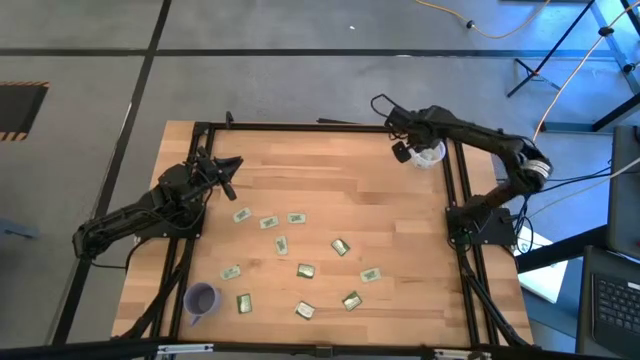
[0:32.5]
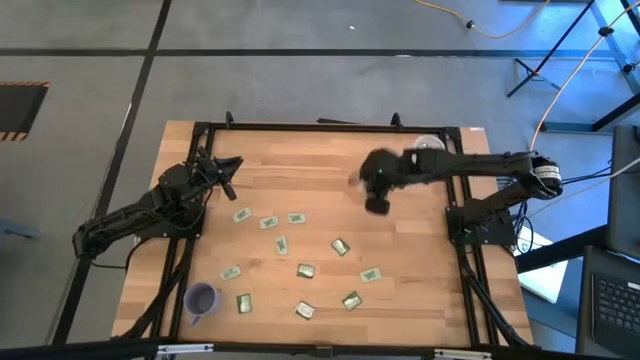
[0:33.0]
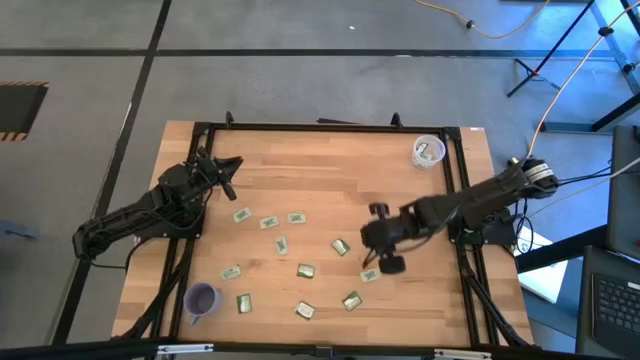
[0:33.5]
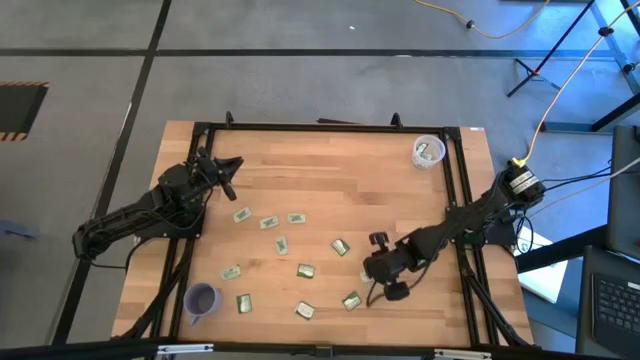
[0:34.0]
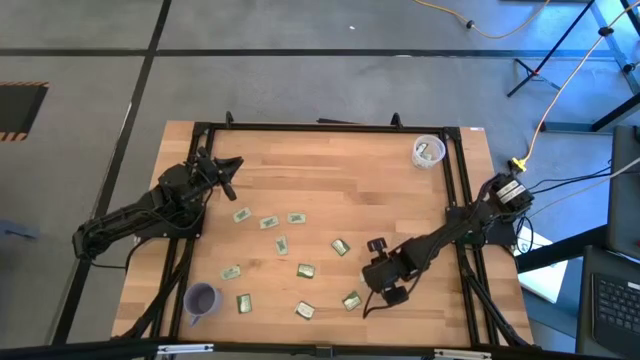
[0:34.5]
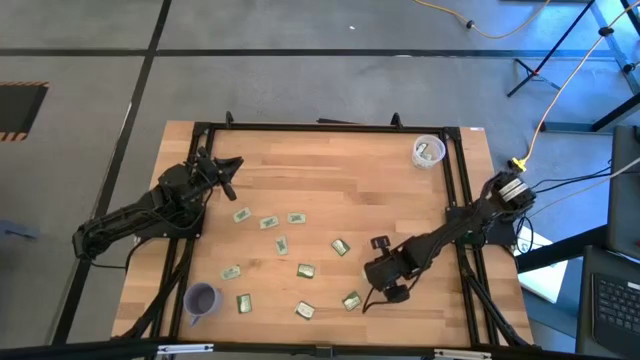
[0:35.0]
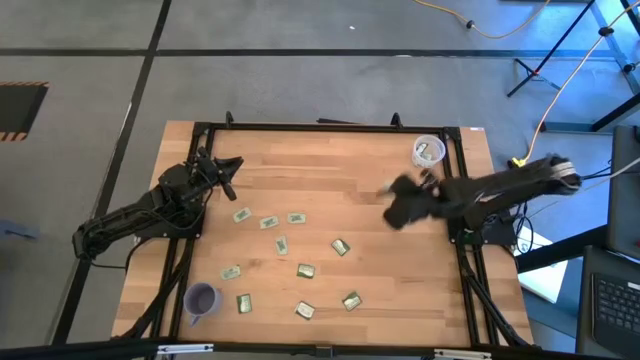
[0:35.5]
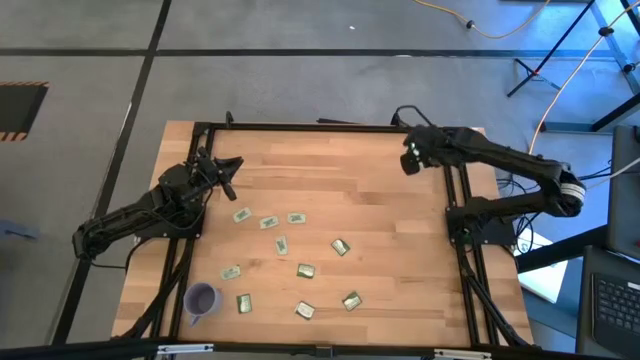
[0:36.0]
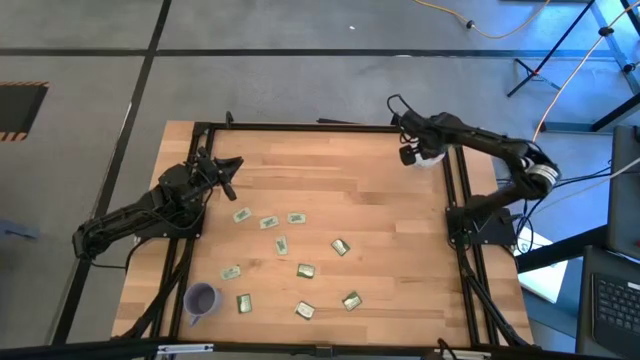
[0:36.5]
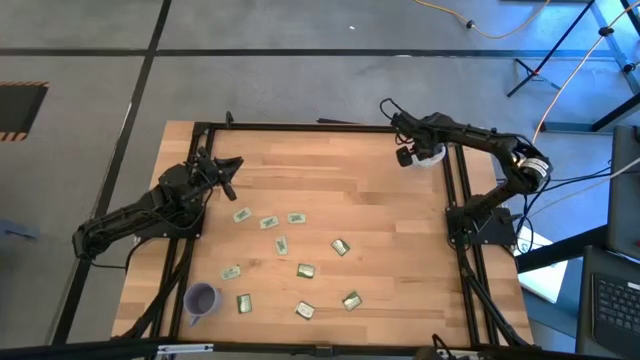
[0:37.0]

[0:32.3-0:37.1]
Task: Pick and place Stevia / Truvia into bins
Put the light green stevia packet into the transparent container

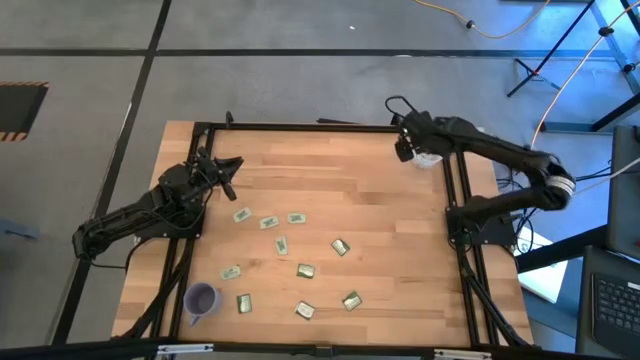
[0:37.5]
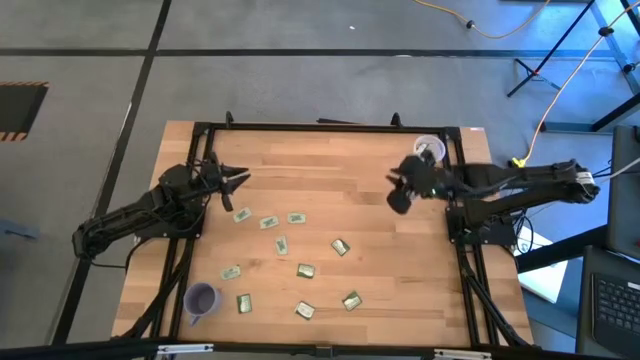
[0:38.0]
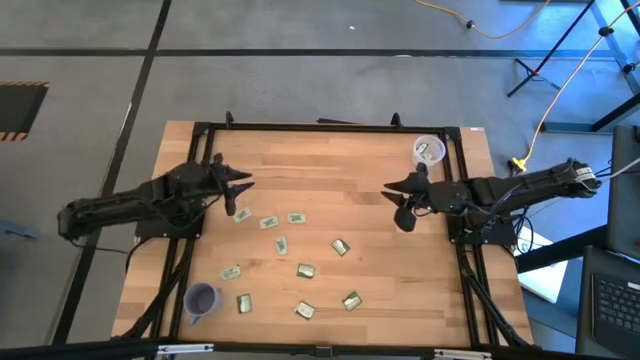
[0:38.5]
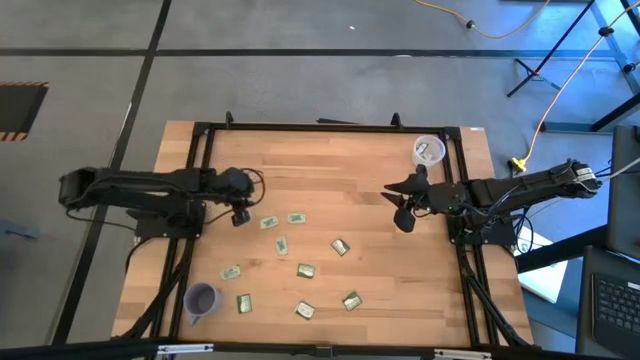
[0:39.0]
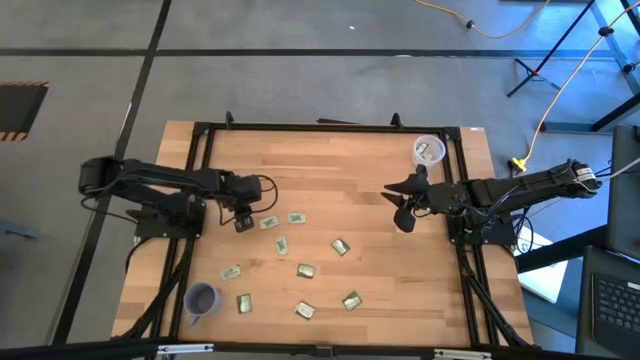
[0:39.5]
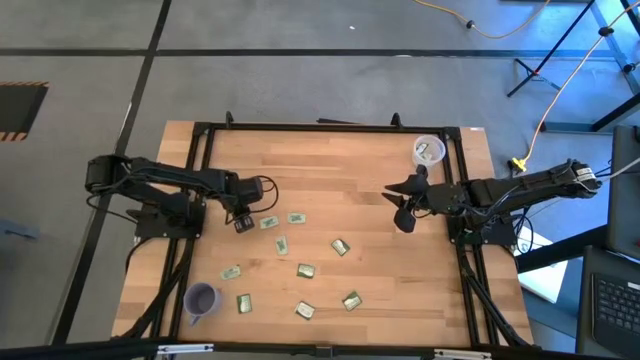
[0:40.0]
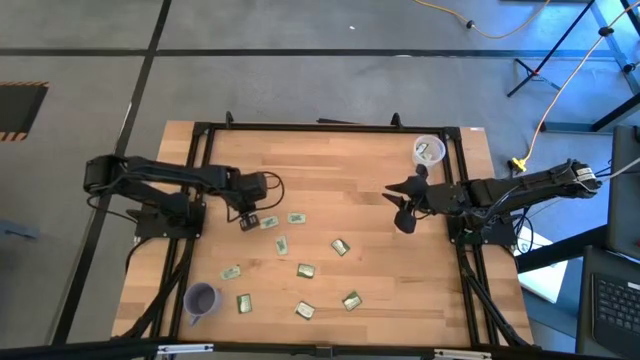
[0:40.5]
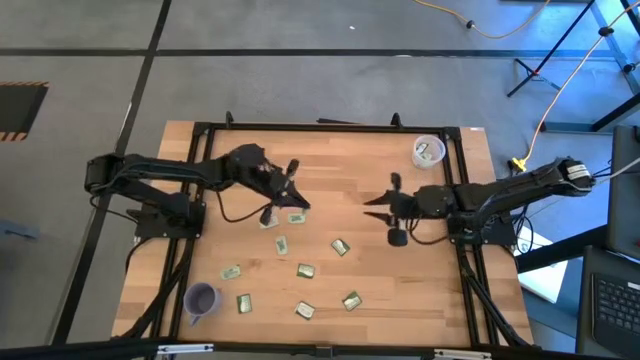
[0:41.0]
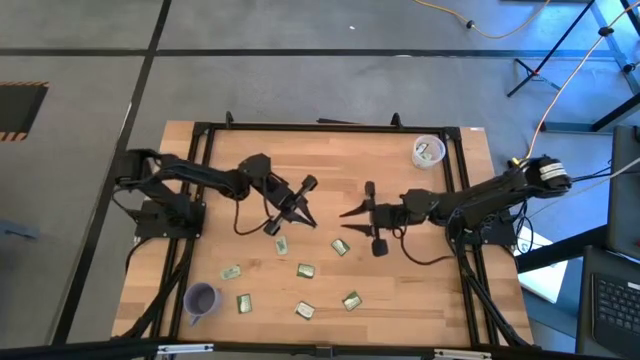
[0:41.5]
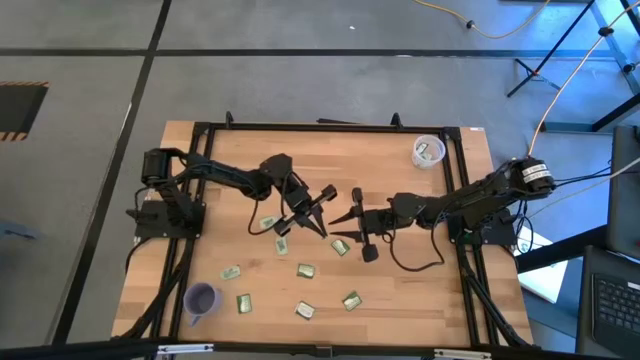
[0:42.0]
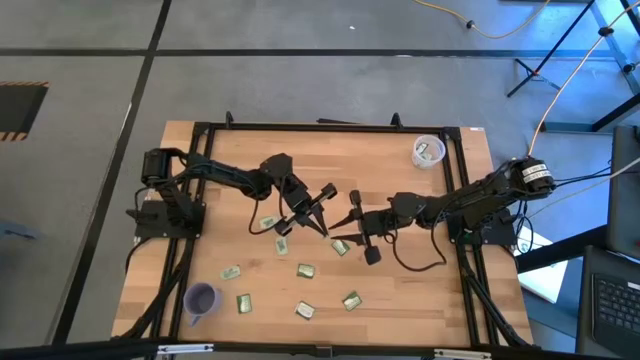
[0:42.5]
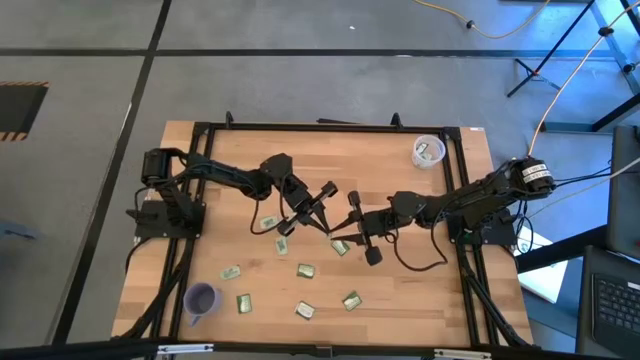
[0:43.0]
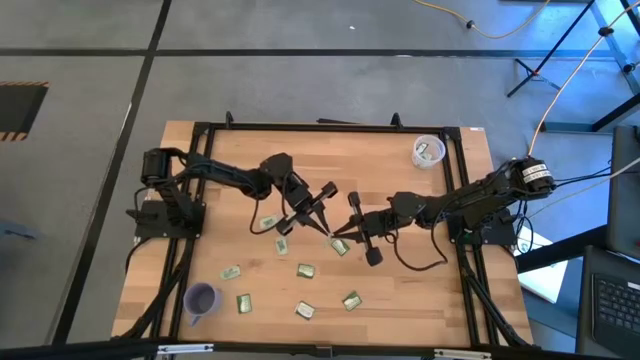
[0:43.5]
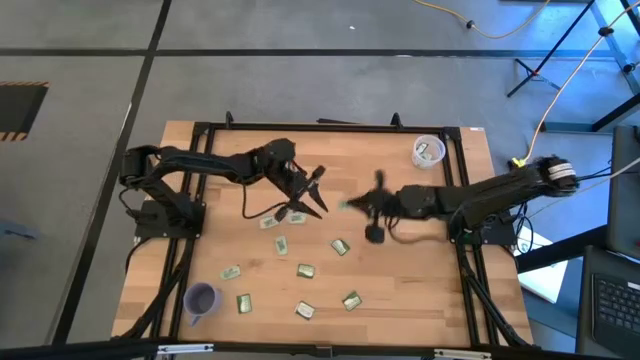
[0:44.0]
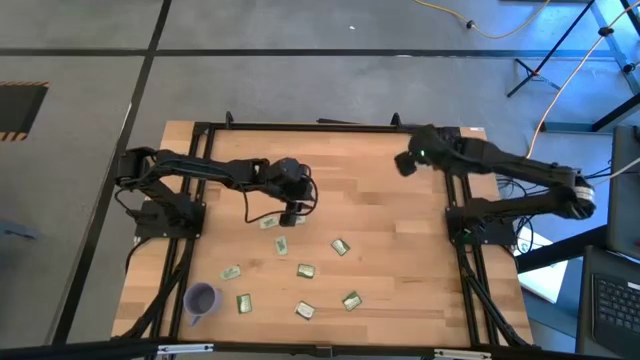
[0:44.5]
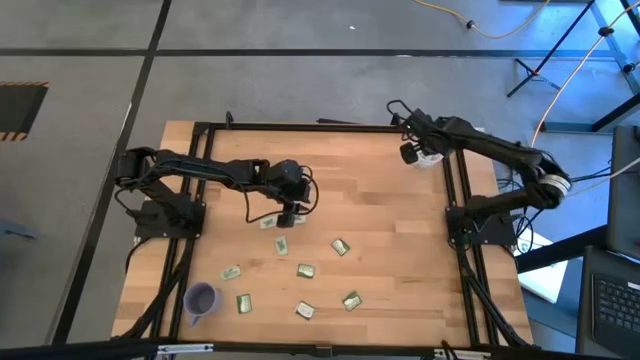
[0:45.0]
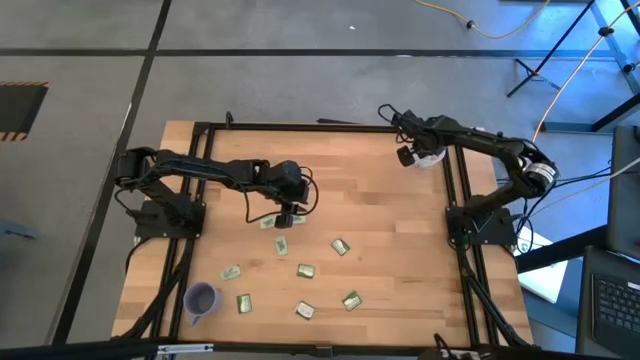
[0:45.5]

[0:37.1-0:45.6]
Put the light green stevia packet into the transparent container

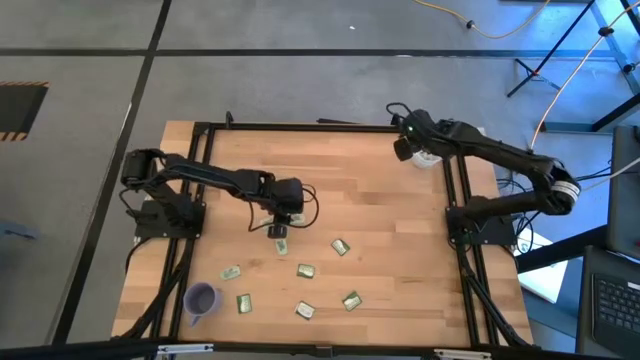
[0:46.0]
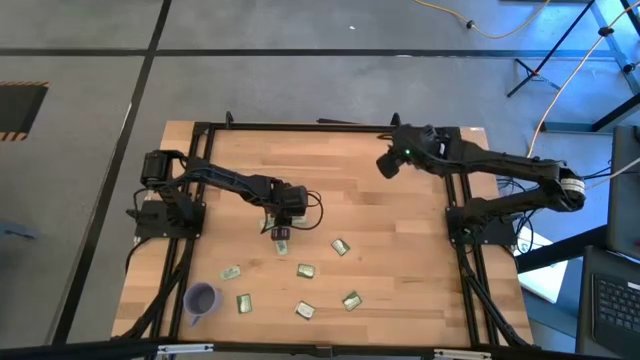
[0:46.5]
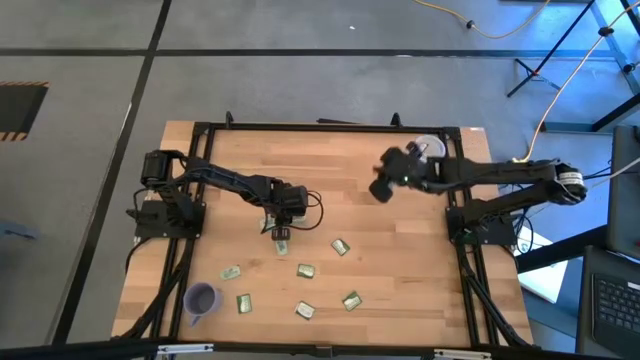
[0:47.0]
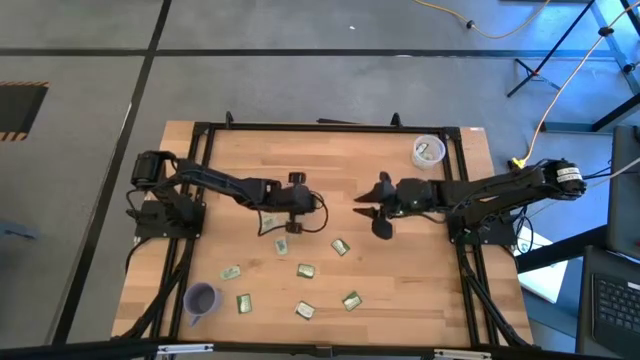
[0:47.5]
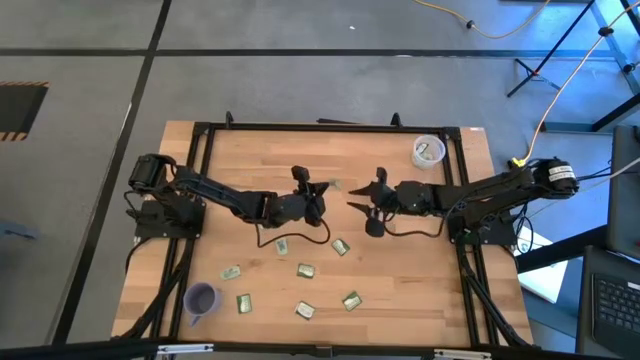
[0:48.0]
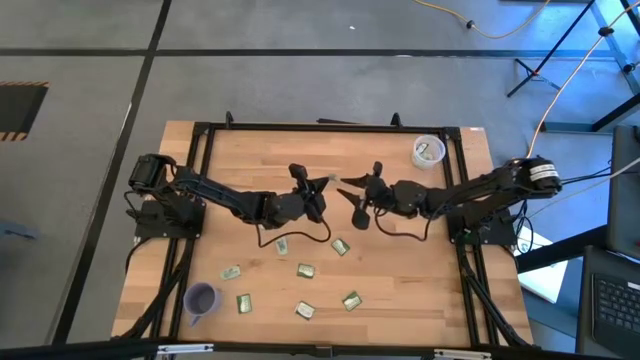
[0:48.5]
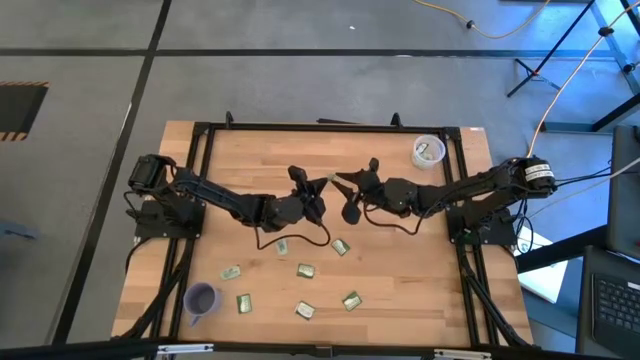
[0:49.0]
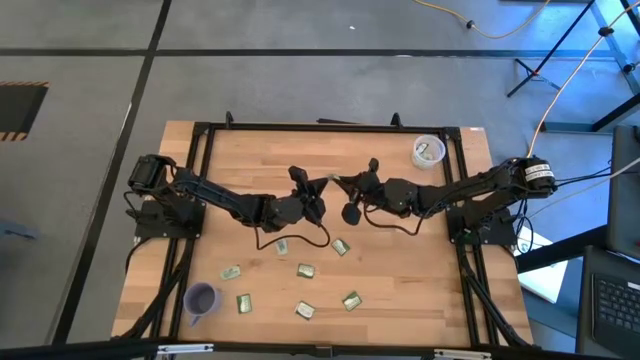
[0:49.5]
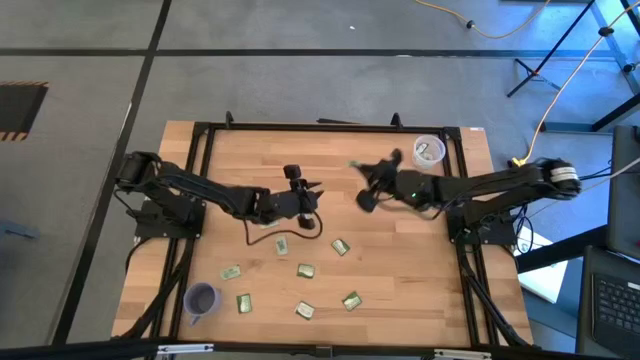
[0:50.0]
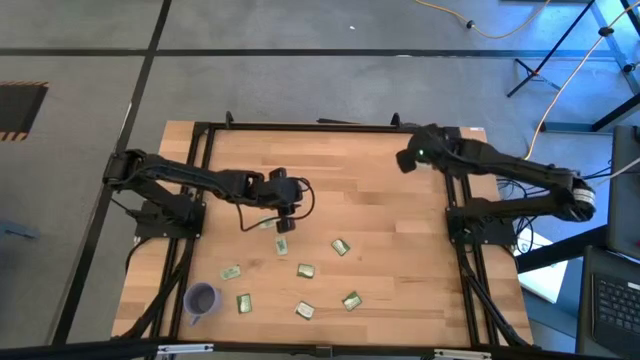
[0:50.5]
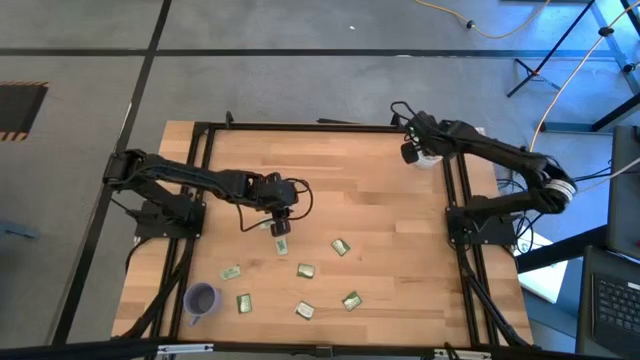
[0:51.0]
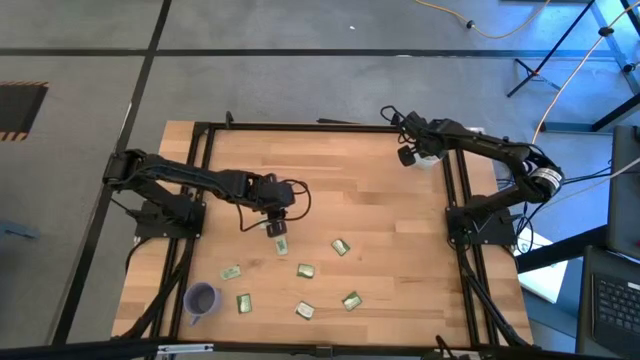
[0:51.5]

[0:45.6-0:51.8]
Put the light green stevia packet into the transparent container

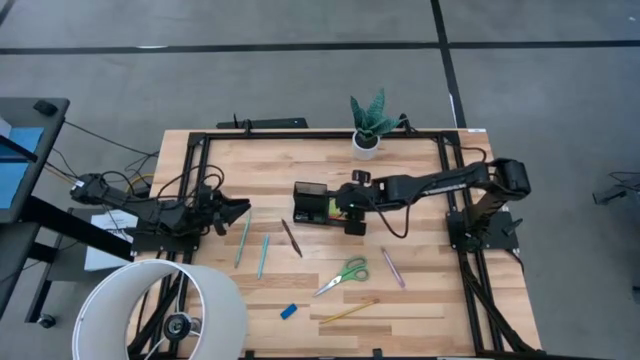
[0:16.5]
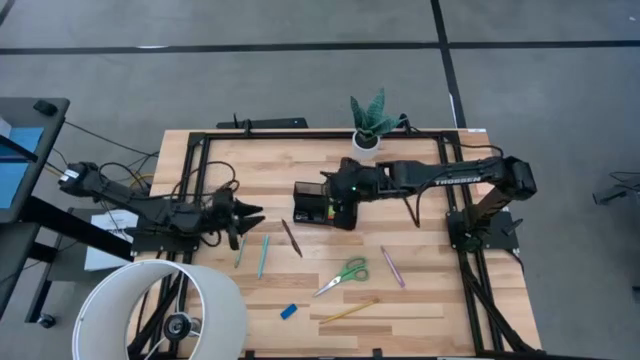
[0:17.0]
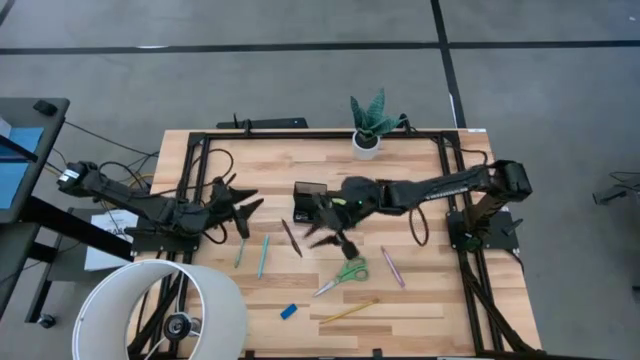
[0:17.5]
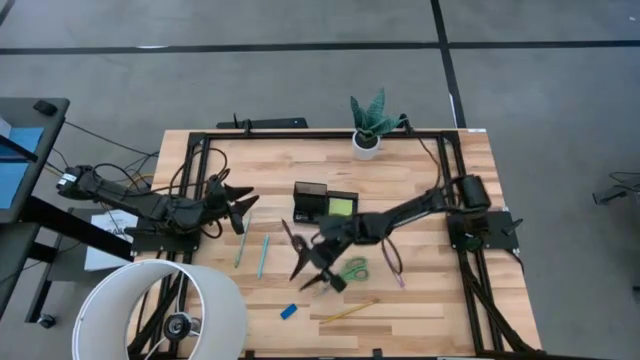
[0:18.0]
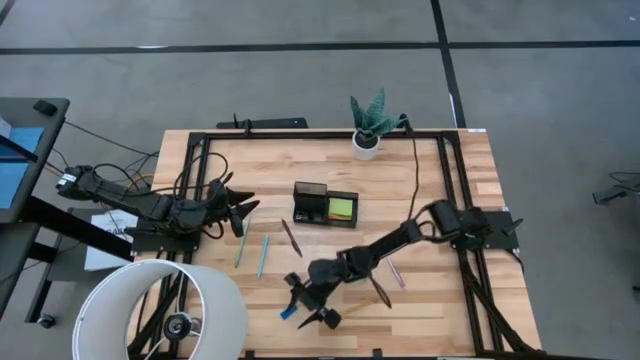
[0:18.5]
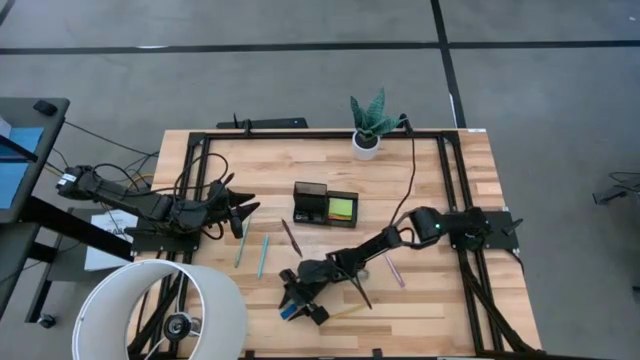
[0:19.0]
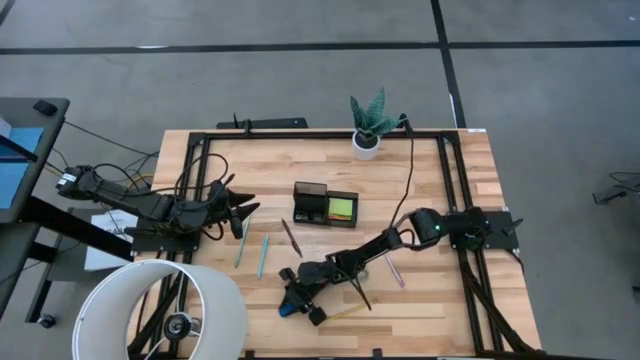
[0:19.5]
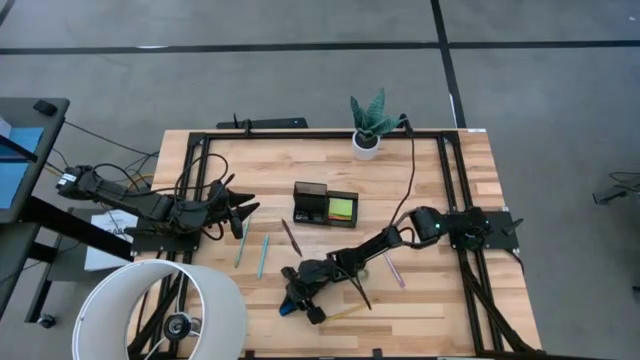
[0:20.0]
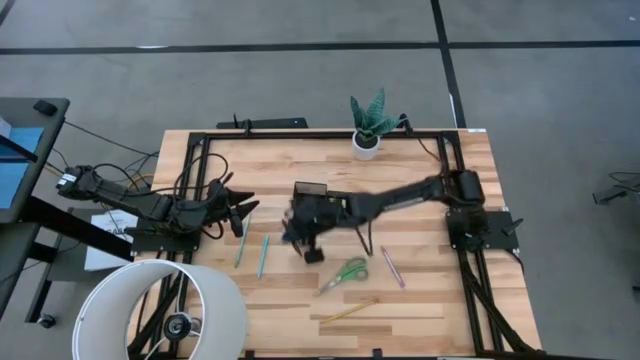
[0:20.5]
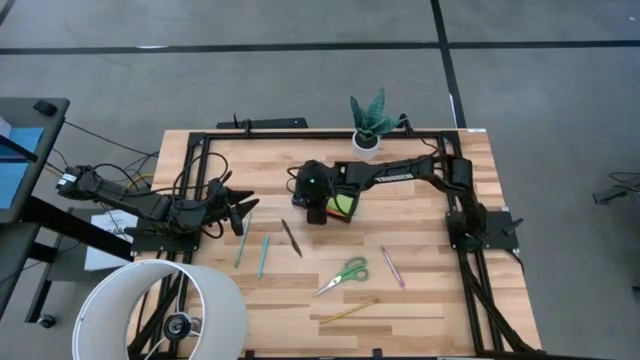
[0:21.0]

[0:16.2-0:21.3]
Task: Pick and place office supplies into organizer
Put the blue eraser into the black desk organizer
